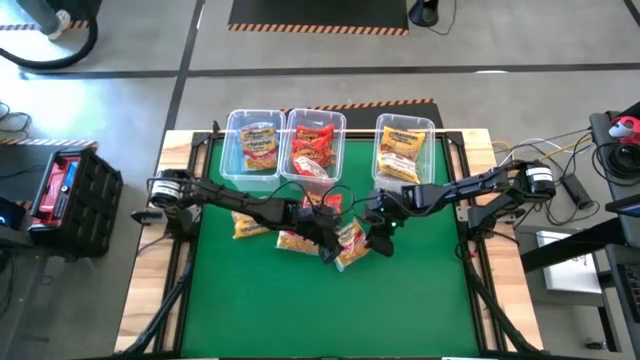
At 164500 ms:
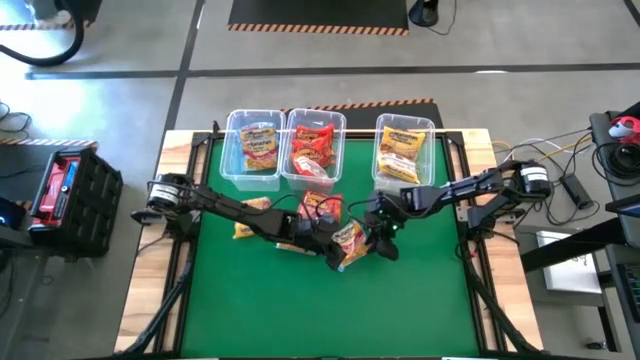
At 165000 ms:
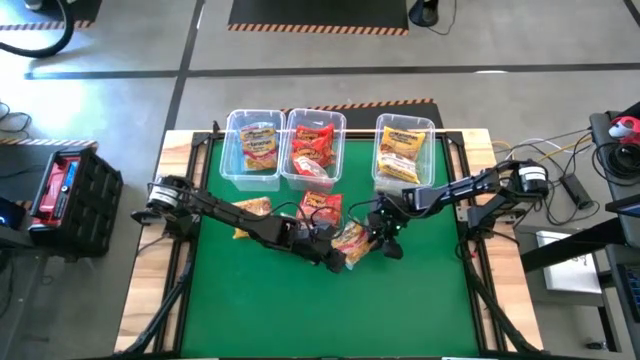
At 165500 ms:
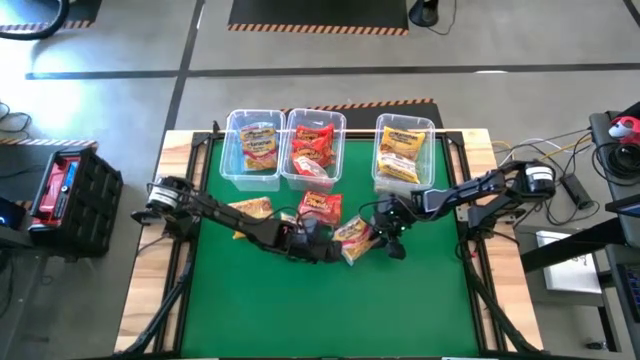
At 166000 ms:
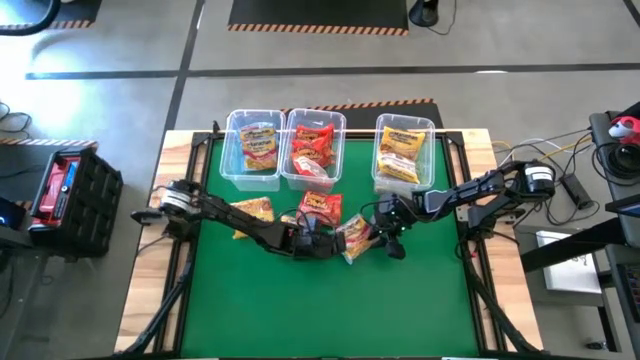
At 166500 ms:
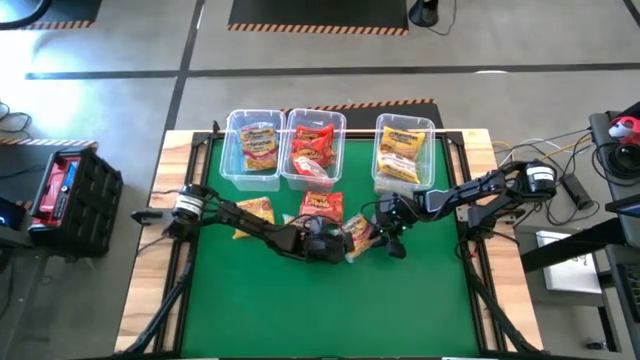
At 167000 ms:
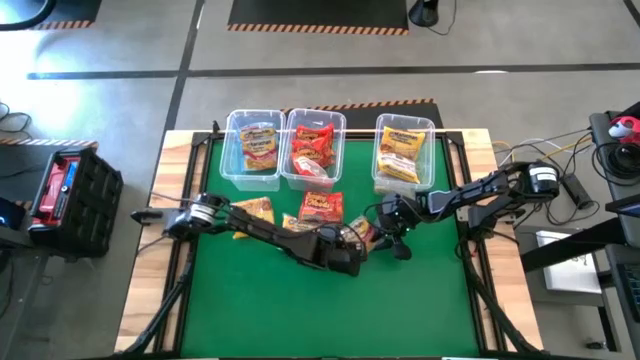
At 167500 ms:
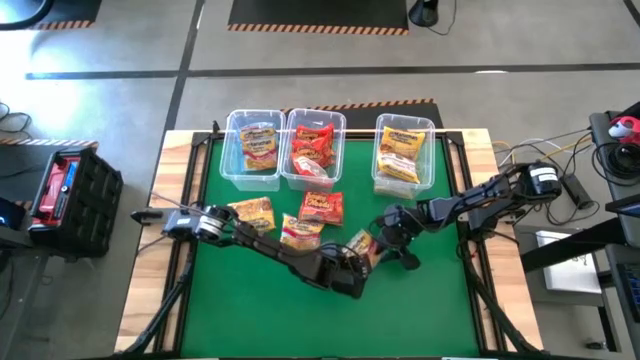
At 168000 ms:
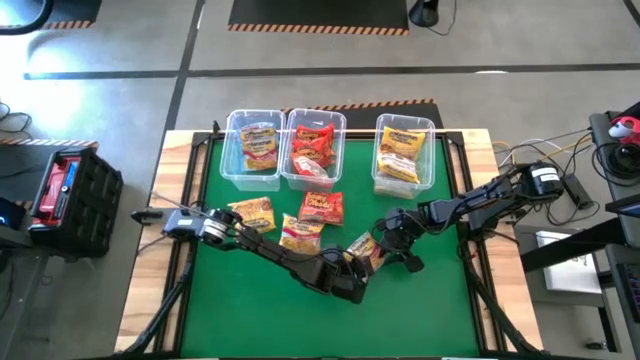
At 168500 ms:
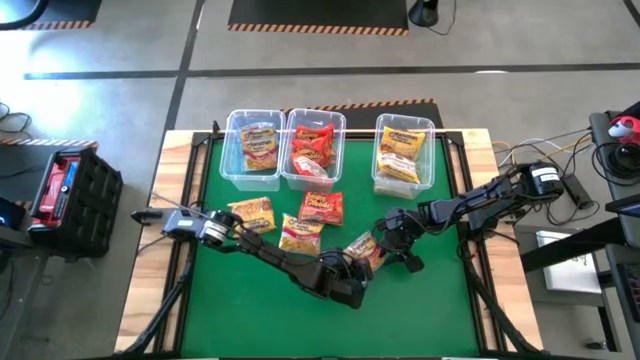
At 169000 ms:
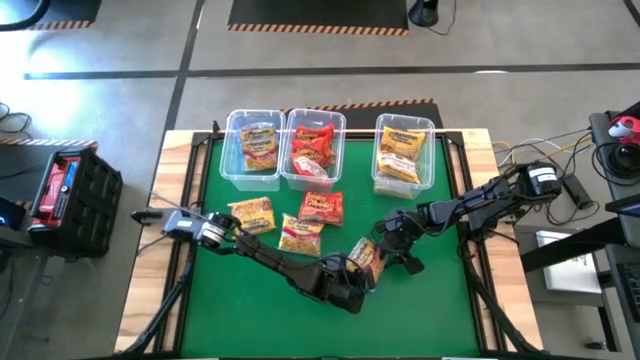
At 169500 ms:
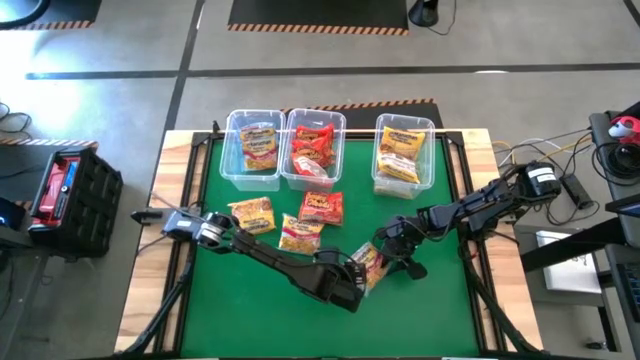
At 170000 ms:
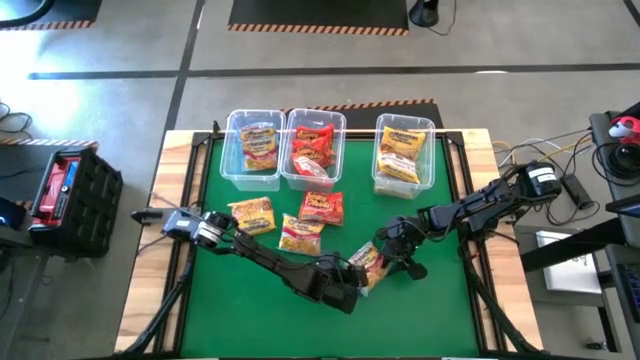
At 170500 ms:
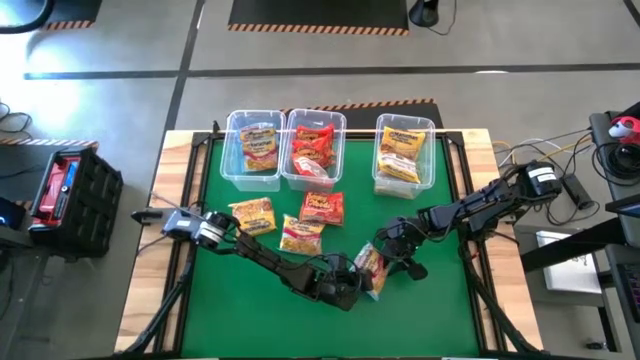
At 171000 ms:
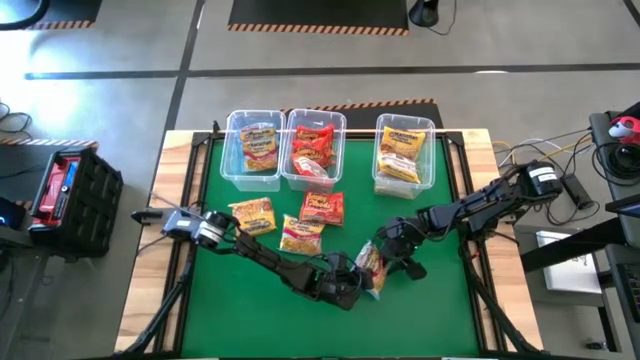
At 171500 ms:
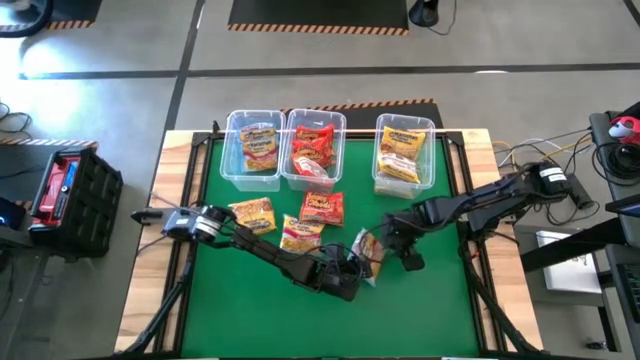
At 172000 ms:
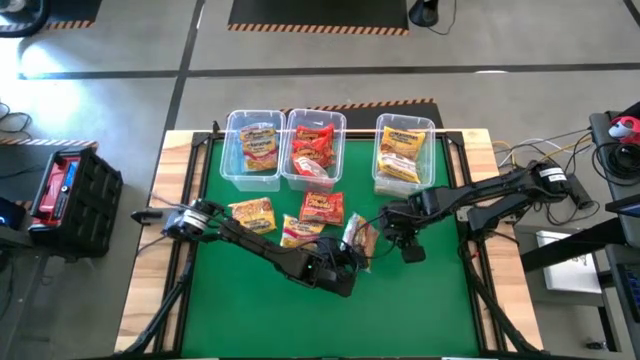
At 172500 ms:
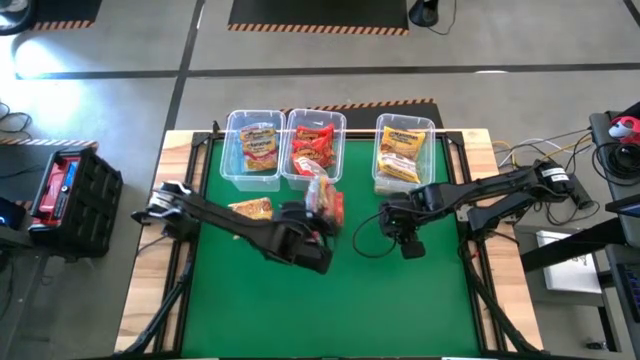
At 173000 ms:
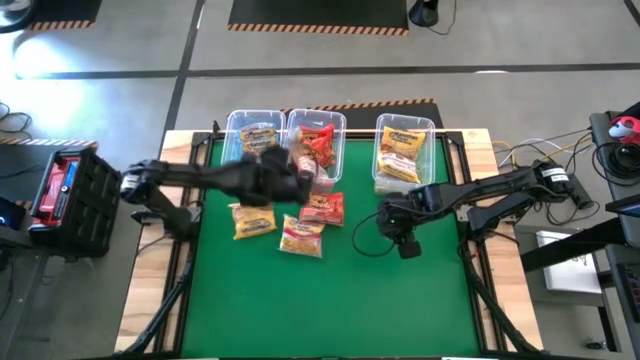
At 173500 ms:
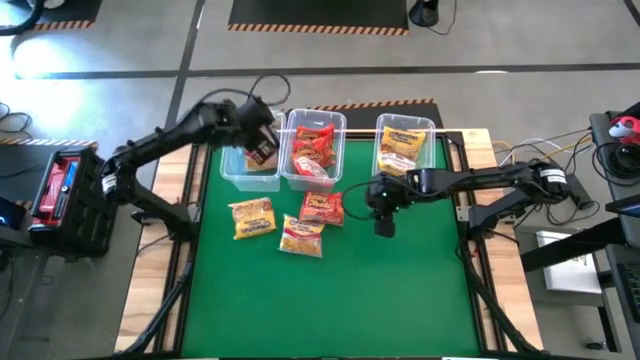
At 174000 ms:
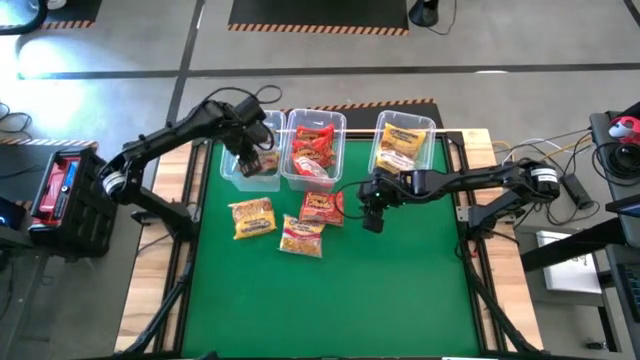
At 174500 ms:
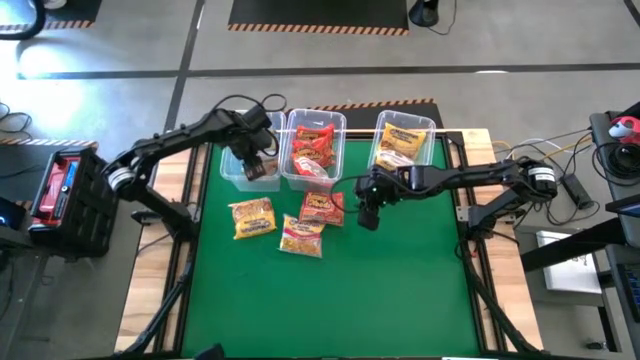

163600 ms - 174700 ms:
Task: Sort Maruchan noodles
Put the right blue noodle pack into the top left transparent bin

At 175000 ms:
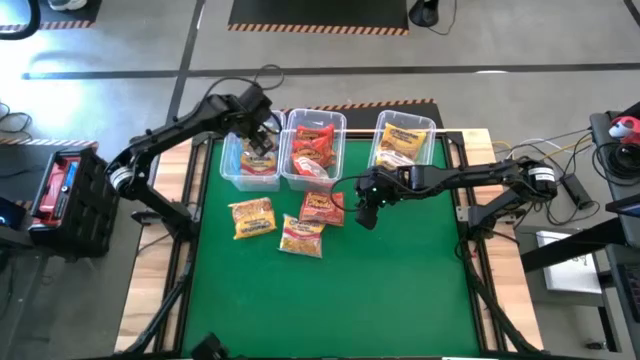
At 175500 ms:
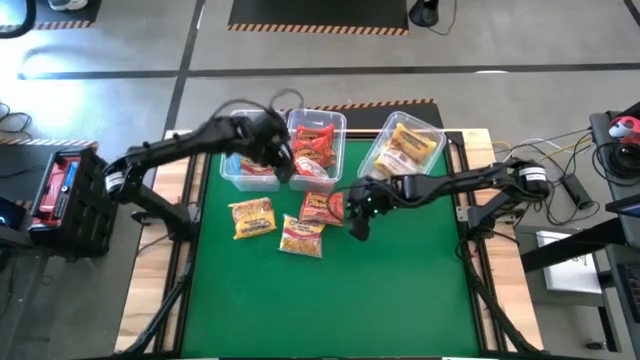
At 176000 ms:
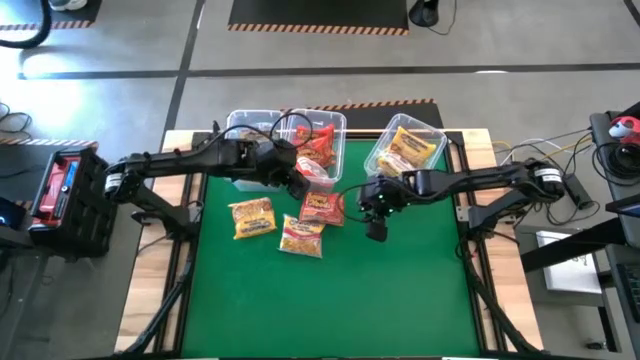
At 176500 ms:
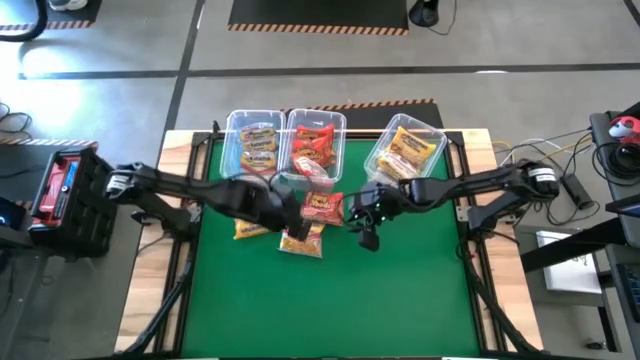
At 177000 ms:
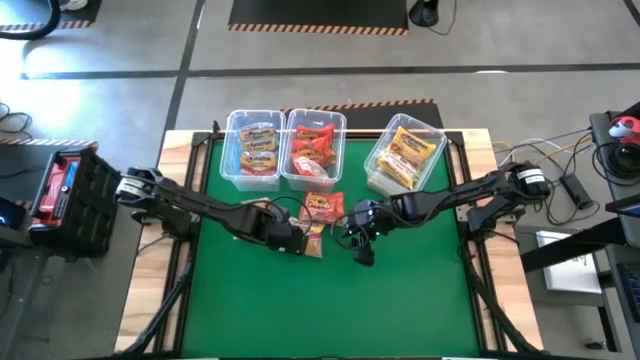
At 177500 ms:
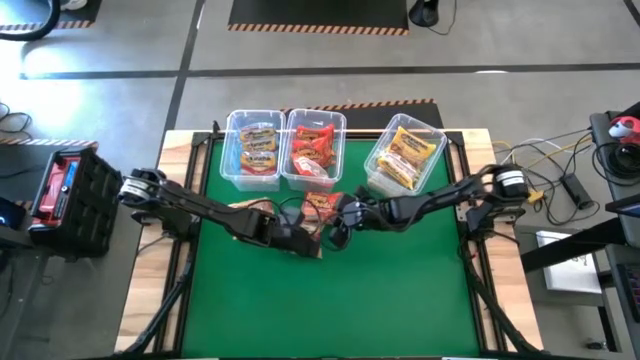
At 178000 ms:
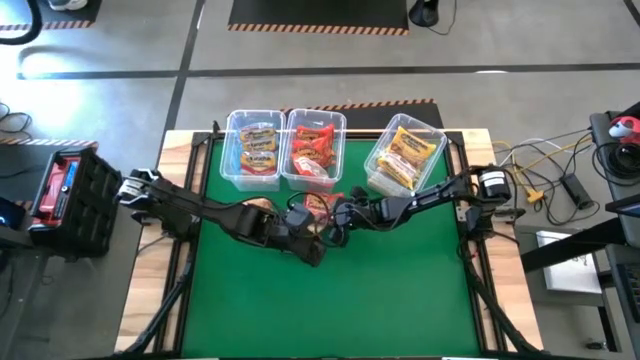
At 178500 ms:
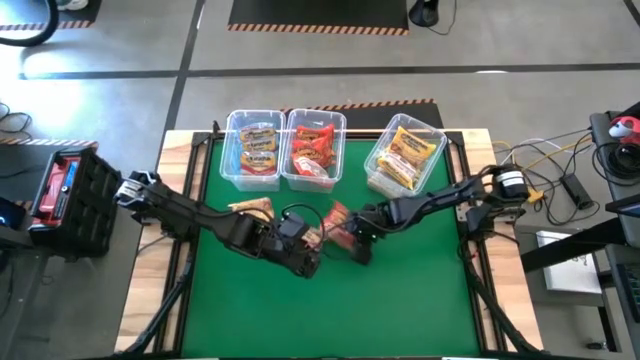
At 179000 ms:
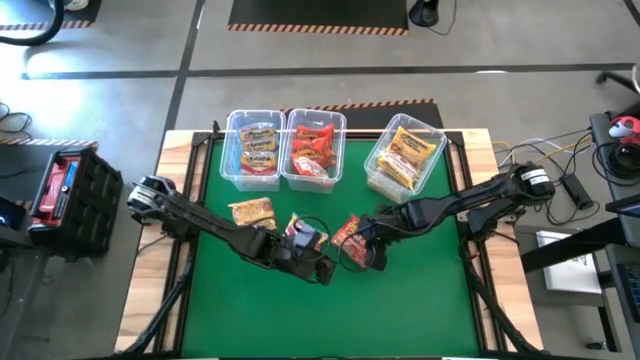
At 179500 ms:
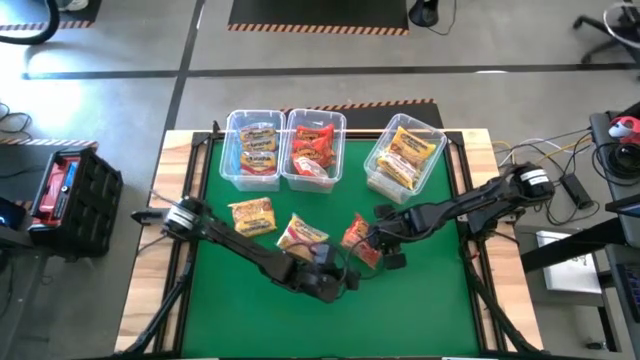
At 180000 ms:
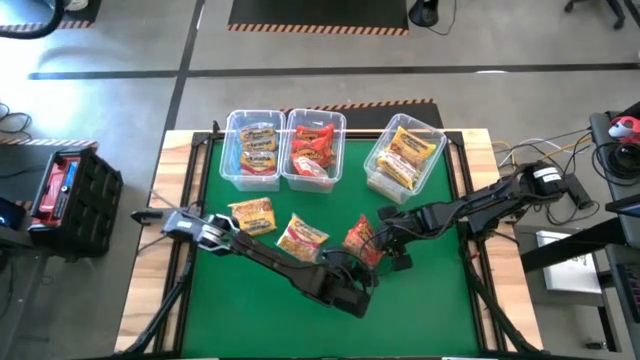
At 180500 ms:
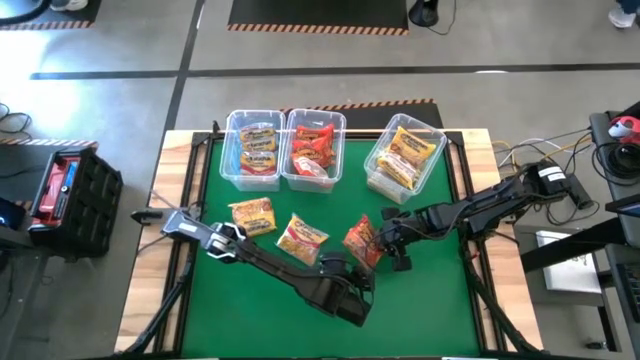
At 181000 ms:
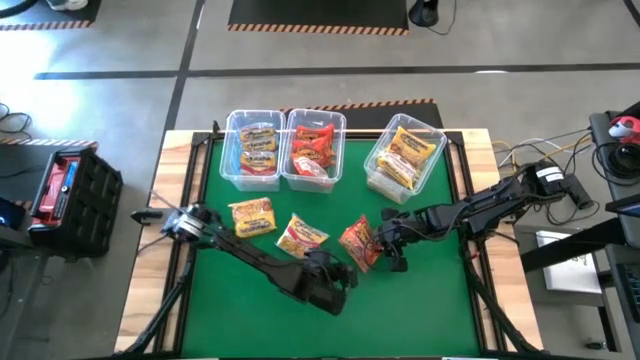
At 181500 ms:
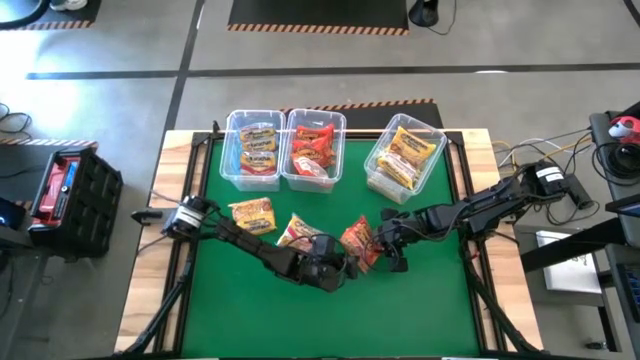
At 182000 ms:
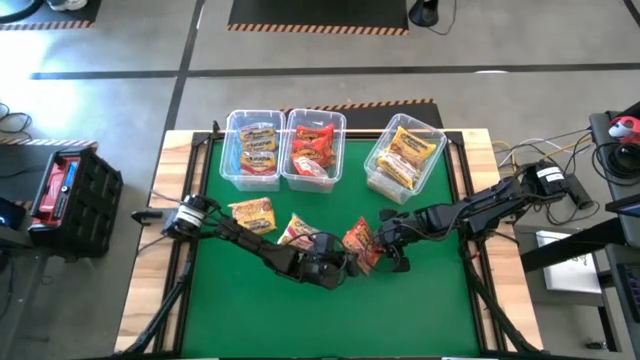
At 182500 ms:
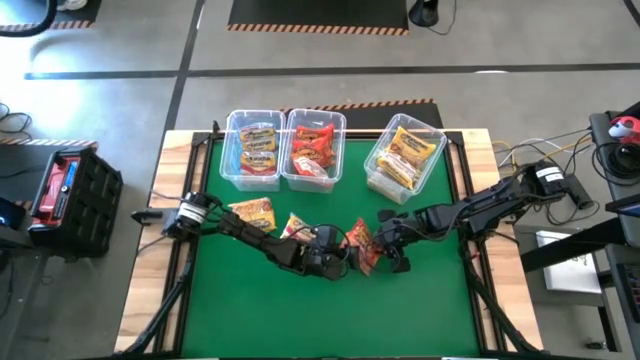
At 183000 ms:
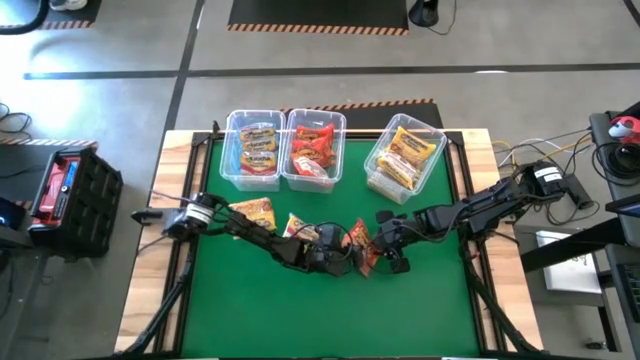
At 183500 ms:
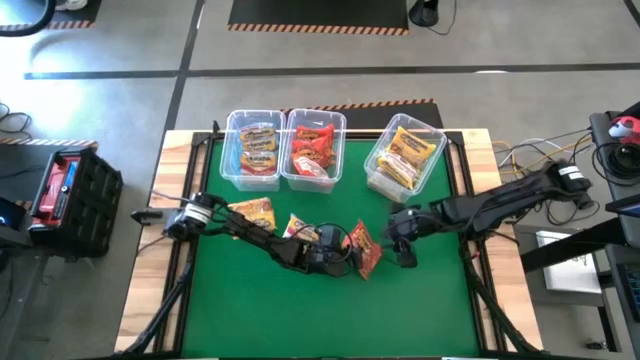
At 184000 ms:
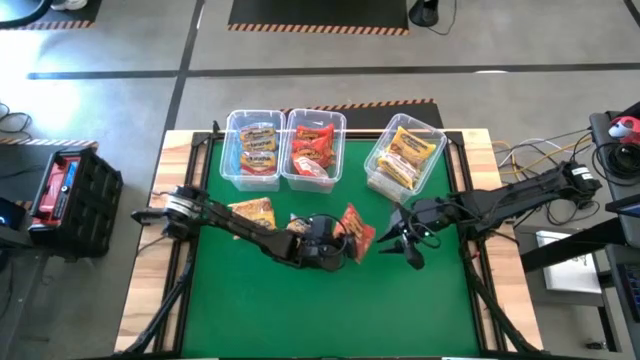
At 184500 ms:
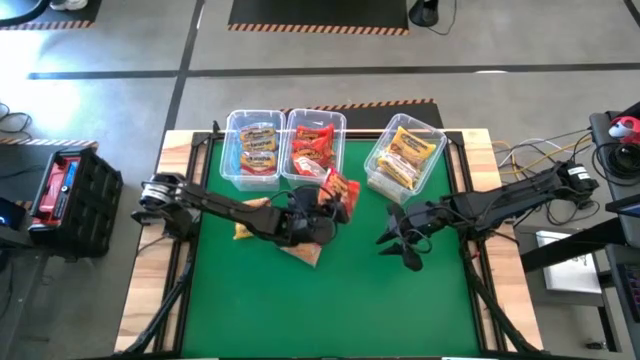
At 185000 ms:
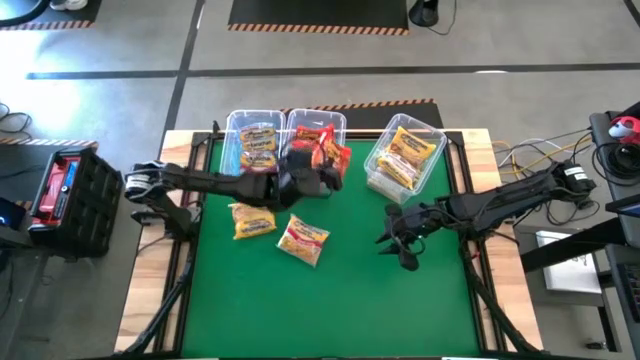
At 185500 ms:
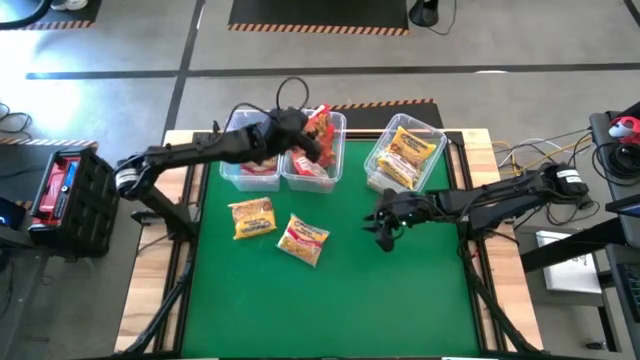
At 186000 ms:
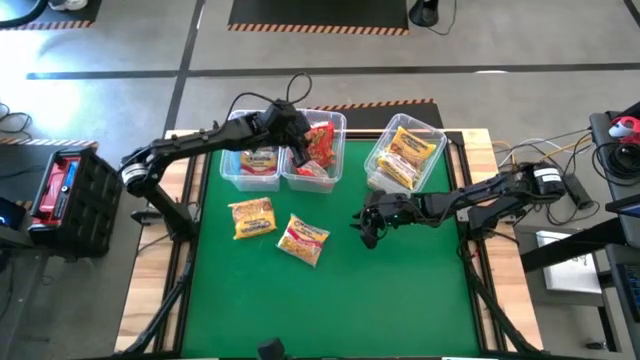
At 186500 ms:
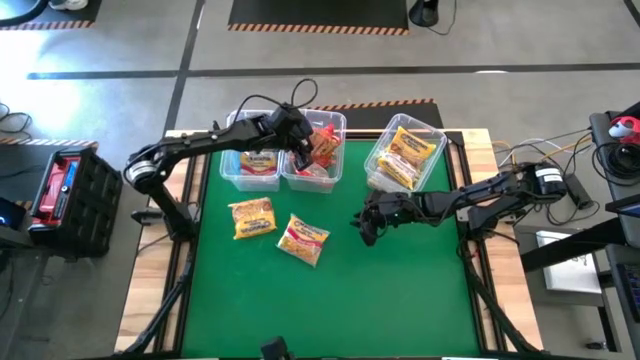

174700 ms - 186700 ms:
Put the orange noodle pack into the top center transparent bin
